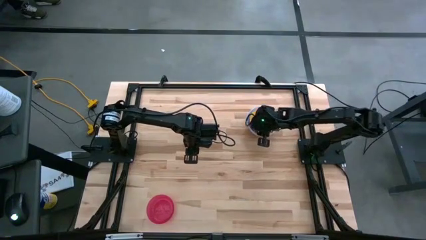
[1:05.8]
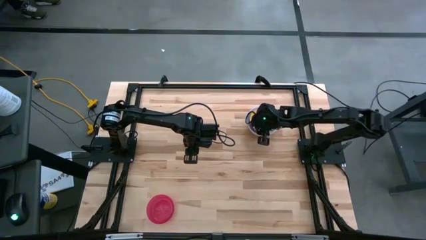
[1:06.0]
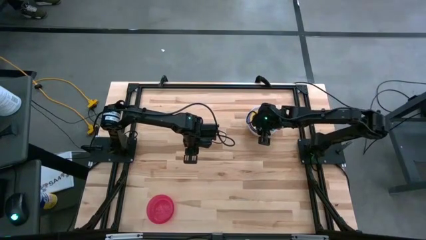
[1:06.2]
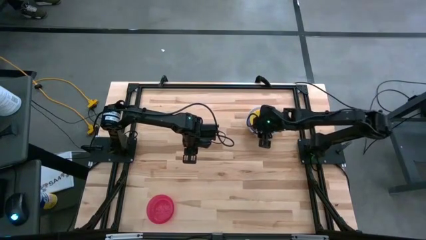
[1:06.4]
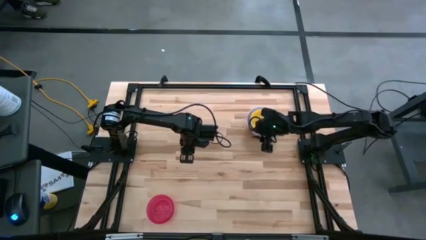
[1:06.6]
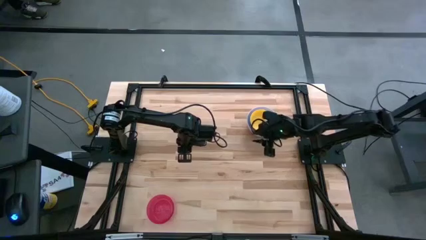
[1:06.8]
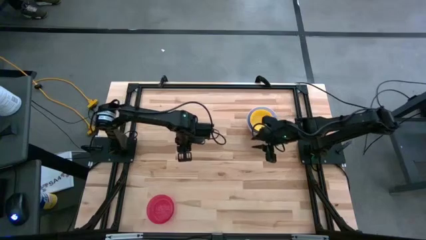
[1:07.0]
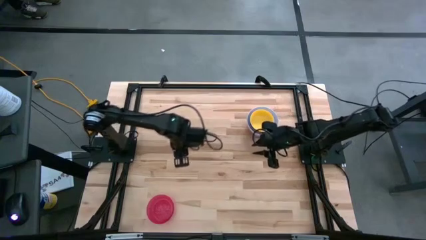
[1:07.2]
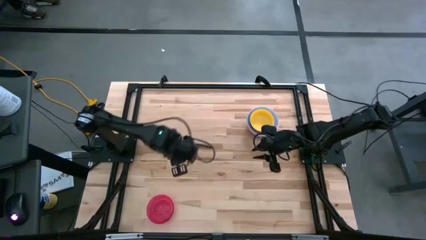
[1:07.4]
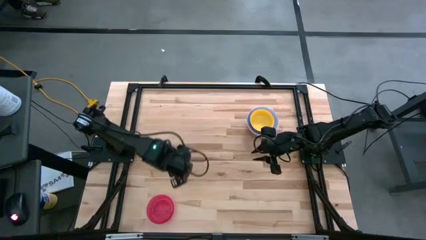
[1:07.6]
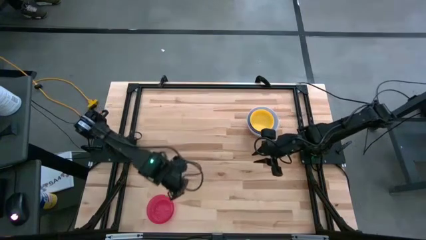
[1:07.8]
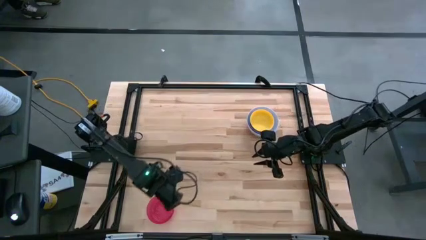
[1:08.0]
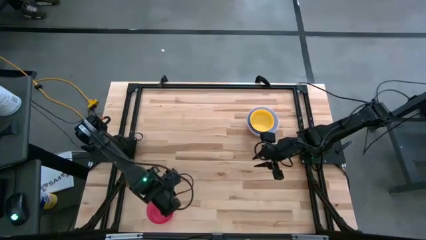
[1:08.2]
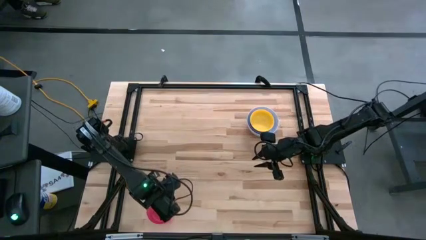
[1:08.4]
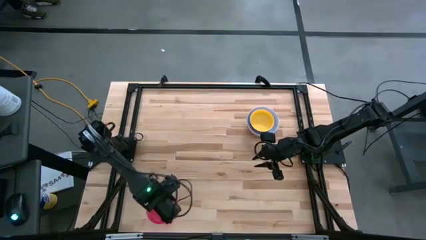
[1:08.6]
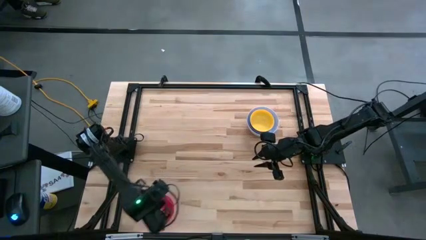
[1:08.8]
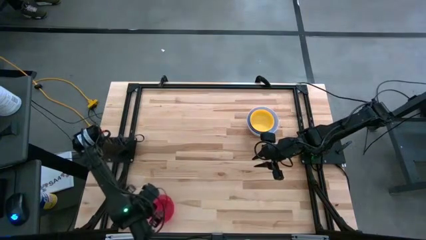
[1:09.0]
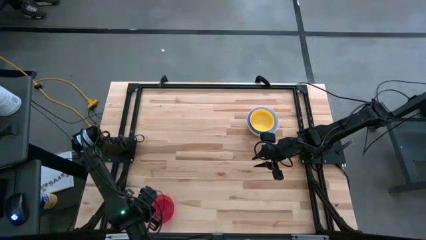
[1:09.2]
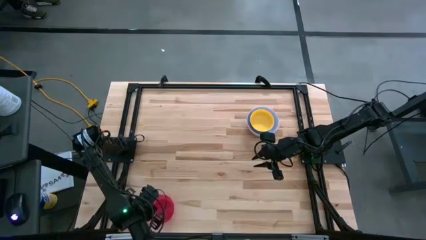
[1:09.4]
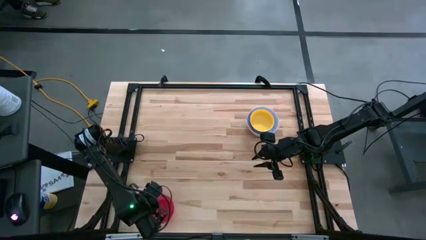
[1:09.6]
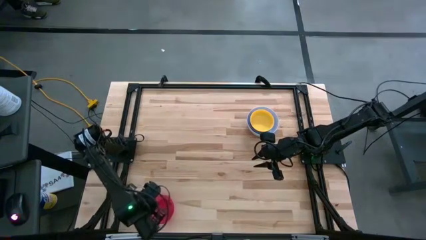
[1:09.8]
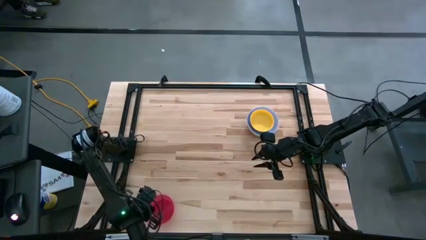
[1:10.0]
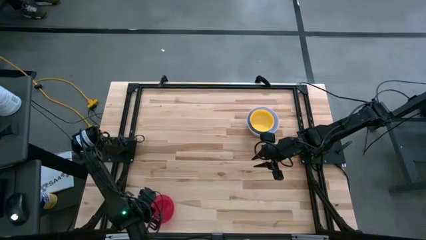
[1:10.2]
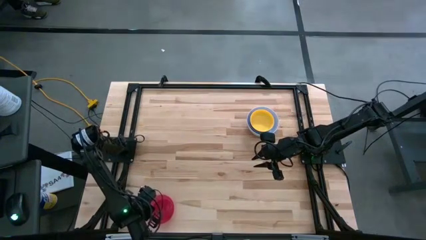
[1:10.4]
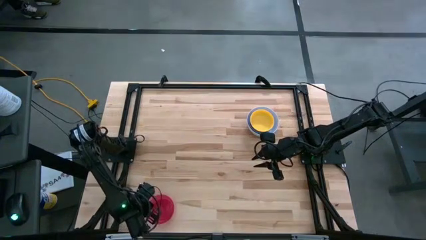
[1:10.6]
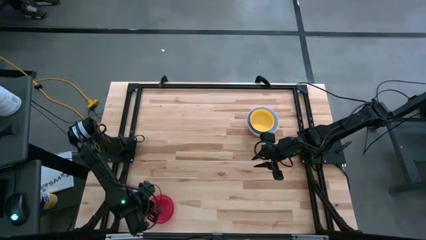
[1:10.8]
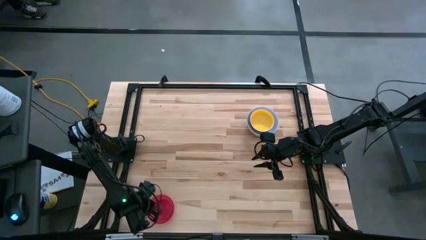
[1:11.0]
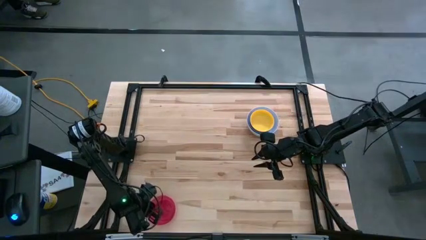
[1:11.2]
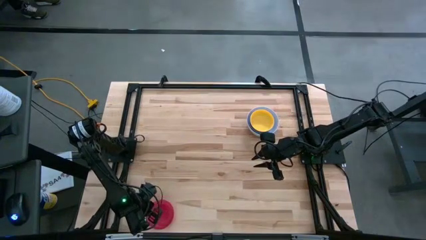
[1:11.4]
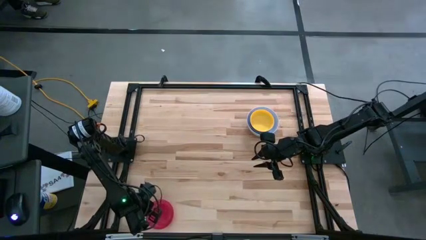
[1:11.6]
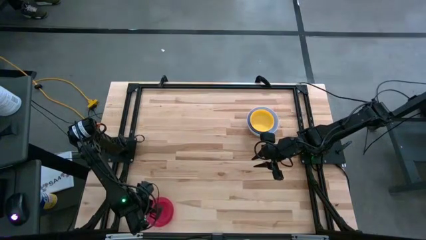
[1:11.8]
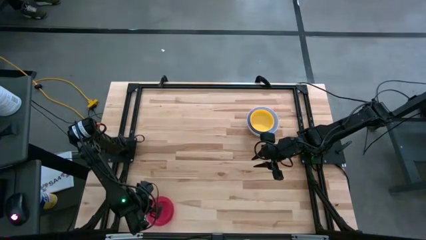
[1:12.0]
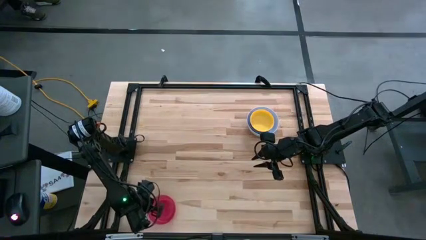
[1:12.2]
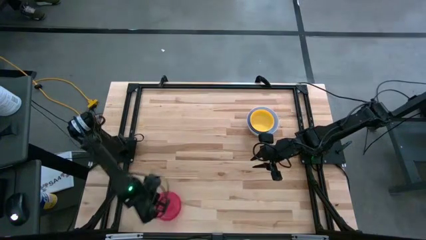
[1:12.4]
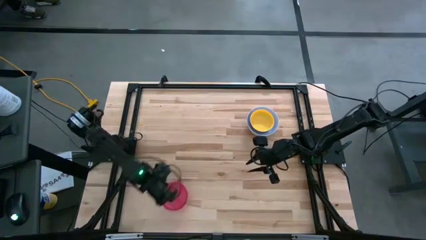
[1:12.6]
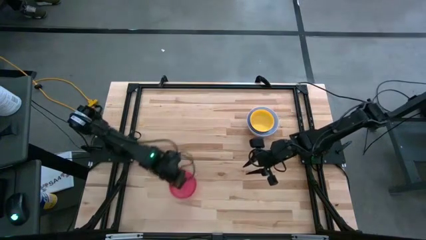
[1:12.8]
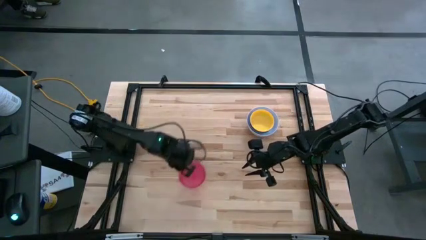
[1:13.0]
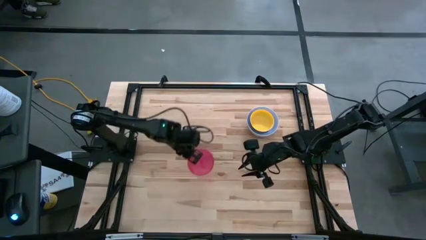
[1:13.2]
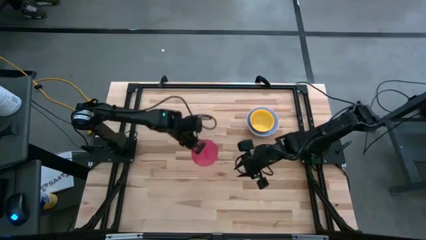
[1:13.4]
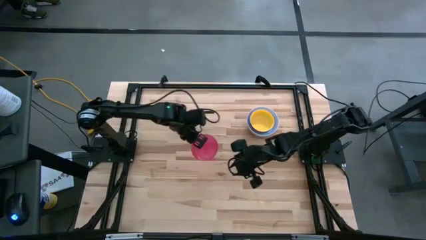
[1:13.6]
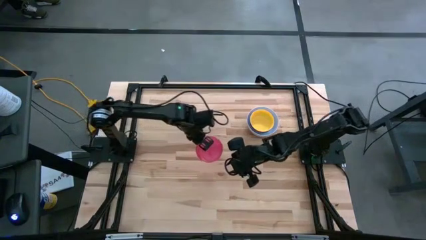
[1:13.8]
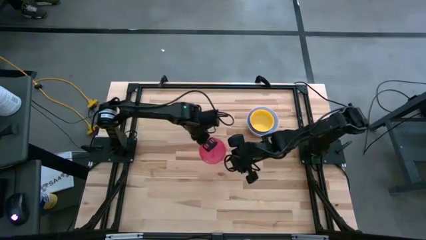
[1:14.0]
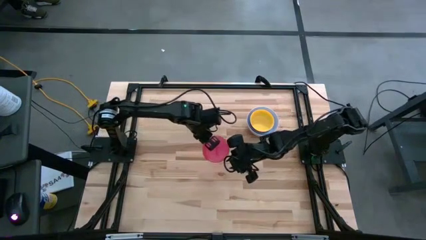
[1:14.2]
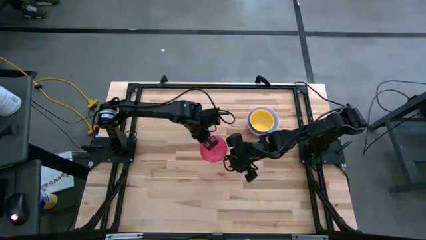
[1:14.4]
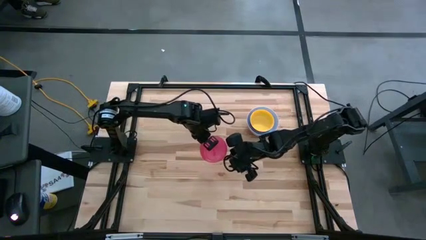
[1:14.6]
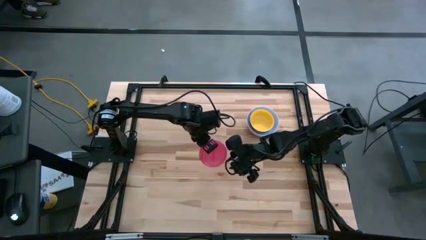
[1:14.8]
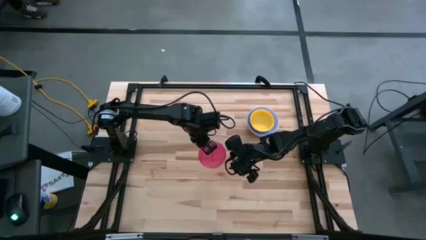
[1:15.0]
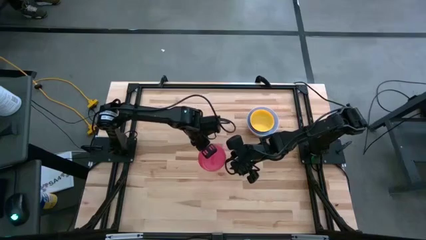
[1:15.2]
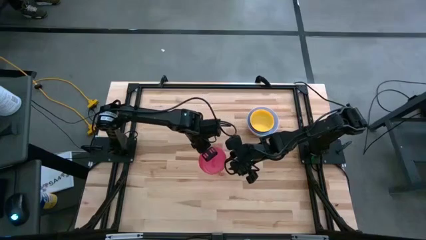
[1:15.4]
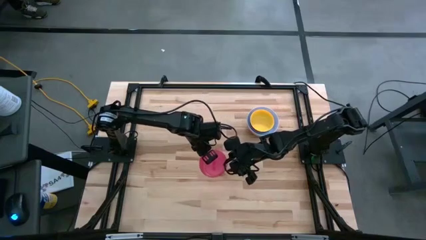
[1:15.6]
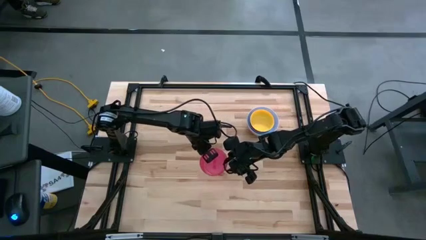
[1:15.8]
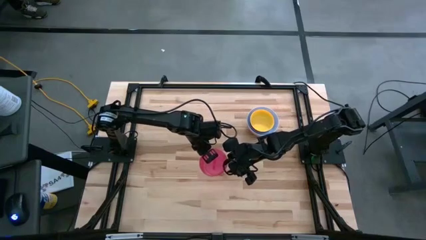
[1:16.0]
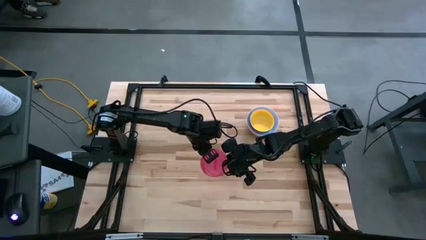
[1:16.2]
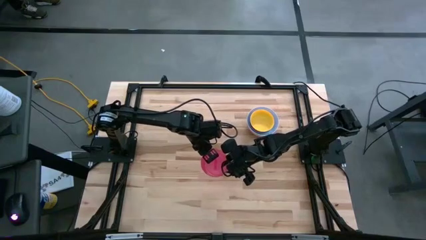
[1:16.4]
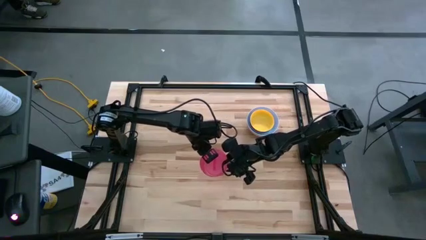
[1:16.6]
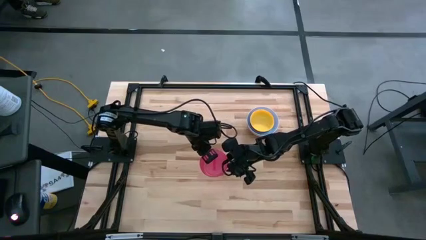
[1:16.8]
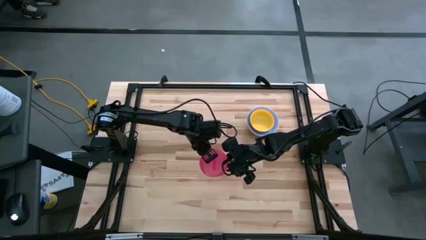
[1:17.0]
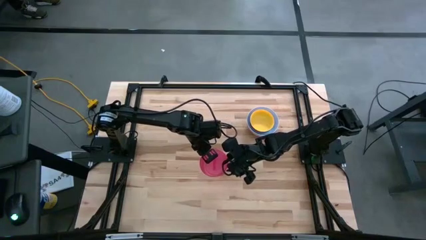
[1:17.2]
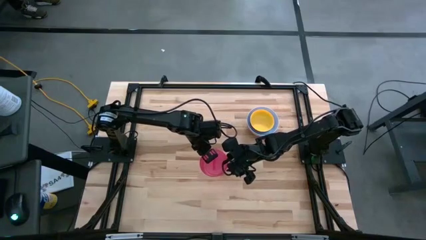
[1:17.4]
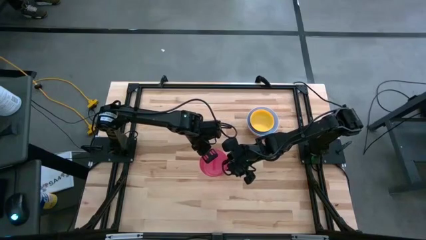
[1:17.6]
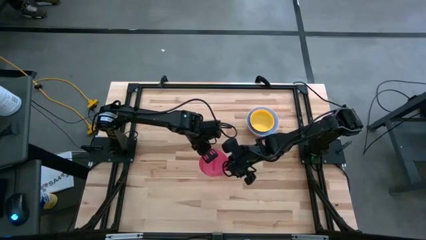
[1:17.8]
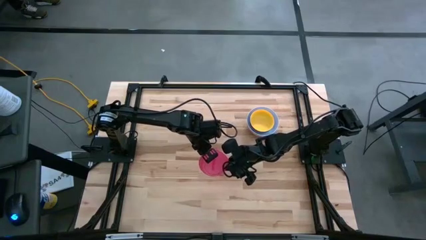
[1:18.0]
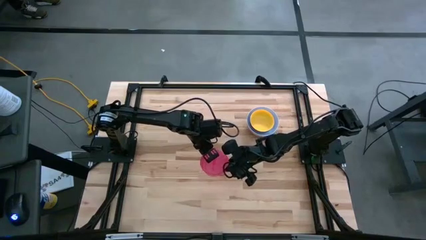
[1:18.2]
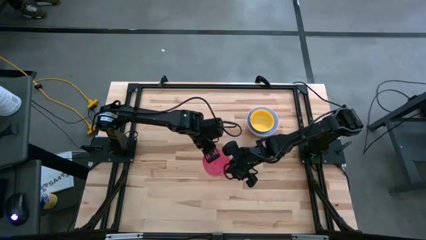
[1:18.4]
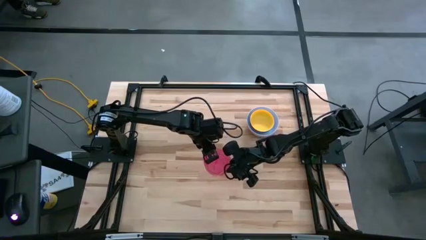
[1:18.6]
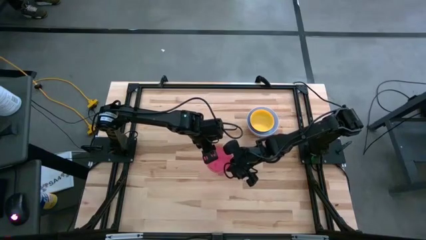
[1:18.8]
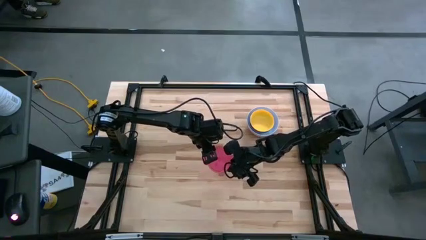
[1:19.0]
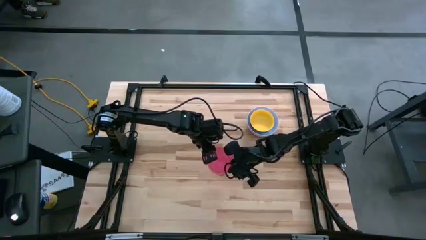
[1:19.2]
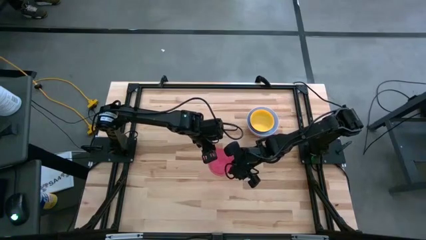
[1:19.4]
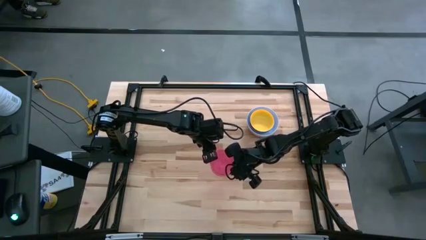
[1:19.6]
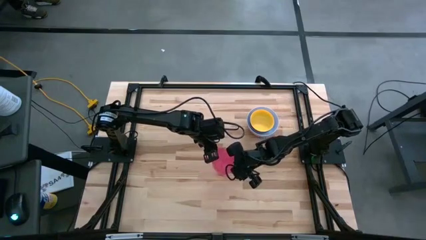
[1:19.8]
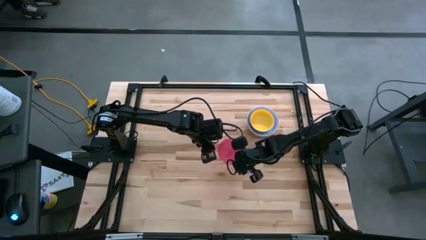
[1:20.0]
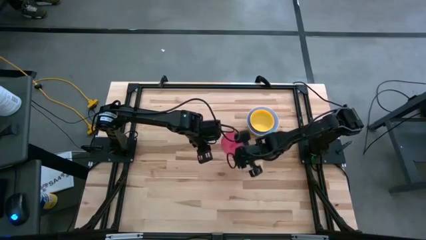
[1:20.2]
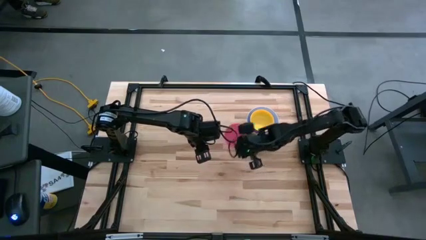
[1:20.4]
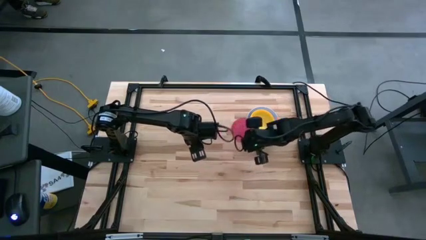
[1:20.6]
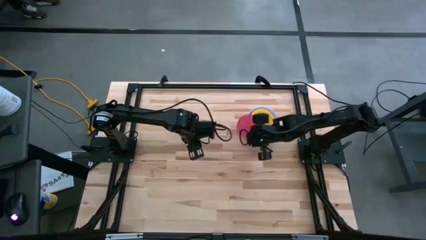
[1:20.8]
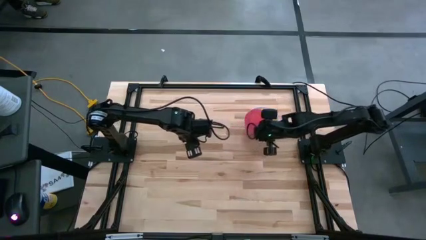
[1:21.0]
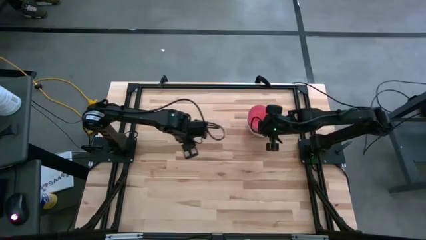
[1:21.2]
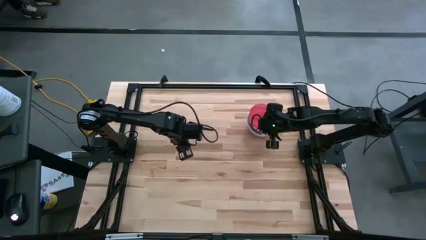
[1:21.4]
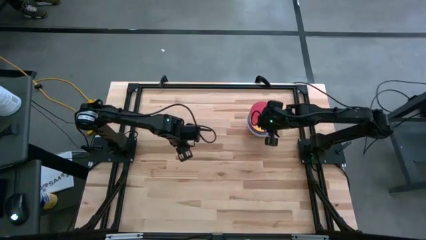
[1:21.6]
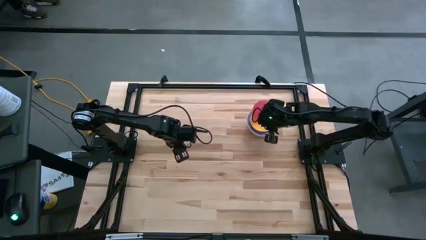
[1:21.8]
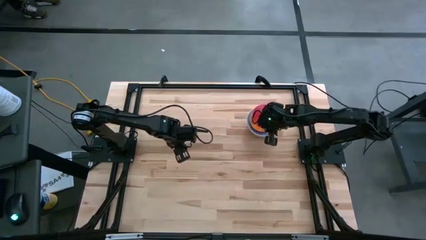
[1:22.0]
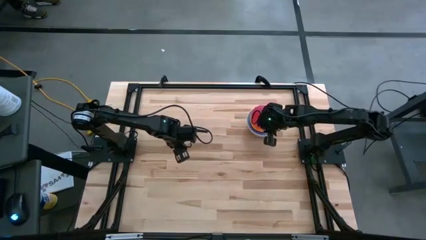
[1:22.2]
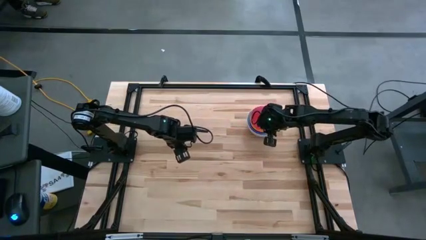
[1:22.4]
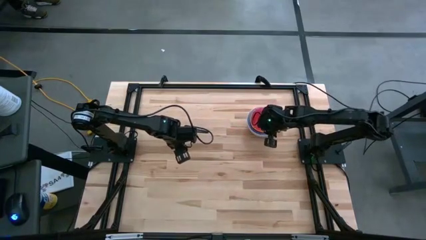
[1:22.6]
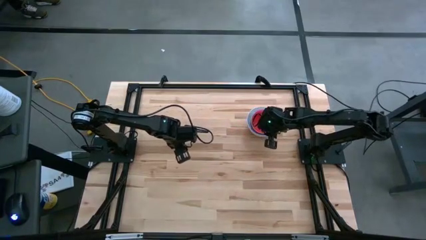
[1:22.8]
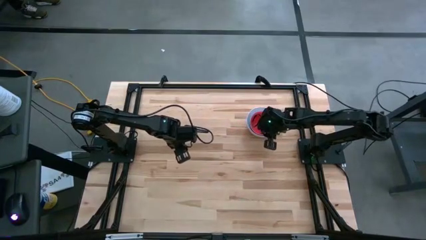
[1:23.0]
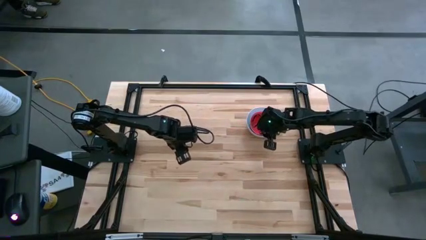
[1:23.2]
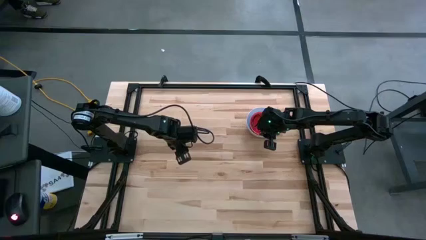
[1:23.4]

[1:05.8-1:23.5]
Stack the red bowl on the yellow bowl
